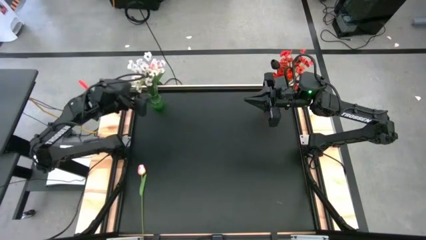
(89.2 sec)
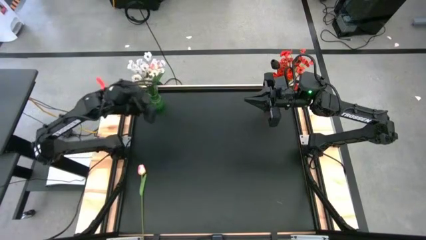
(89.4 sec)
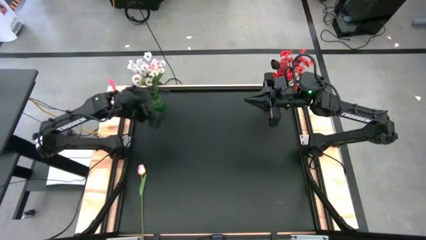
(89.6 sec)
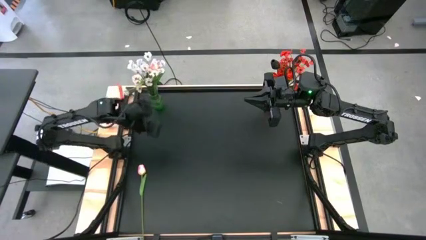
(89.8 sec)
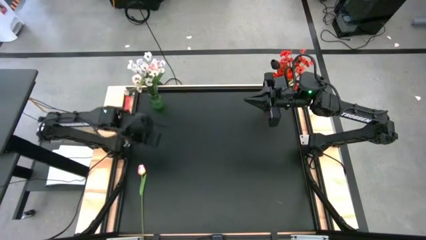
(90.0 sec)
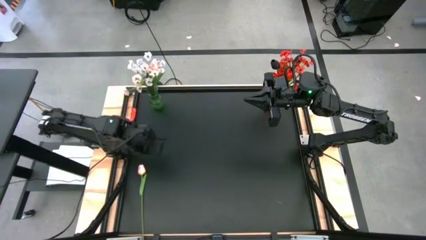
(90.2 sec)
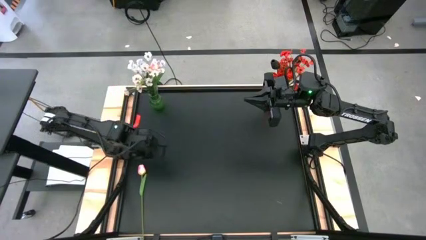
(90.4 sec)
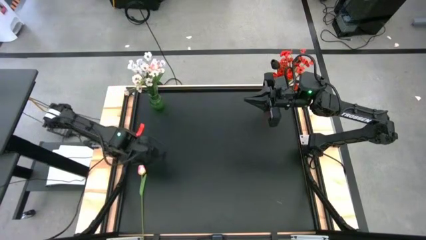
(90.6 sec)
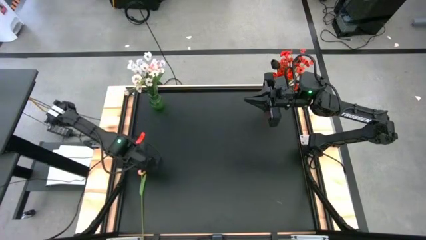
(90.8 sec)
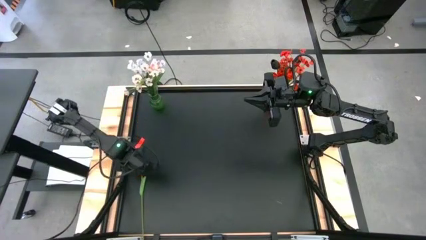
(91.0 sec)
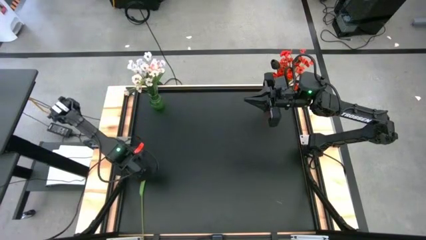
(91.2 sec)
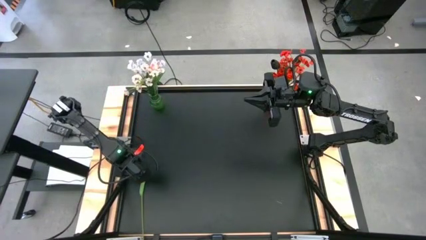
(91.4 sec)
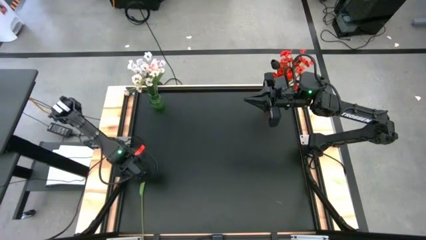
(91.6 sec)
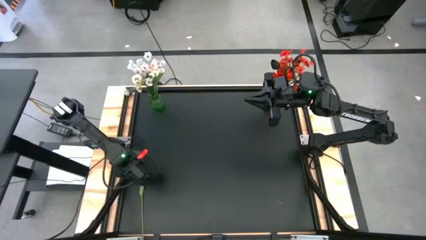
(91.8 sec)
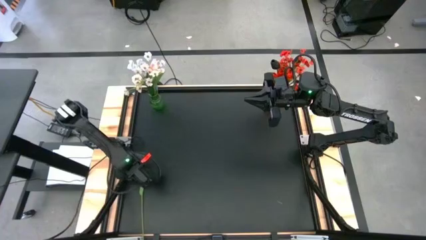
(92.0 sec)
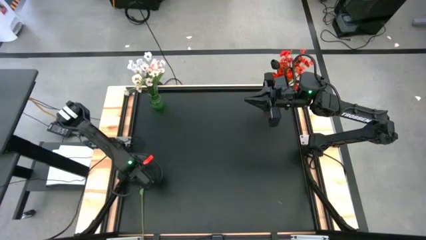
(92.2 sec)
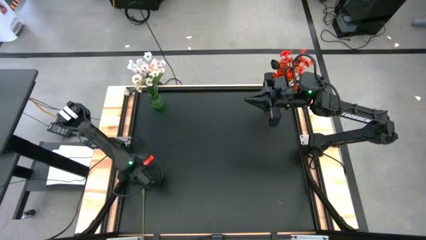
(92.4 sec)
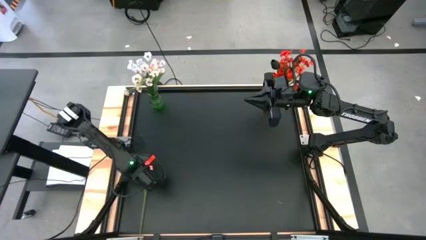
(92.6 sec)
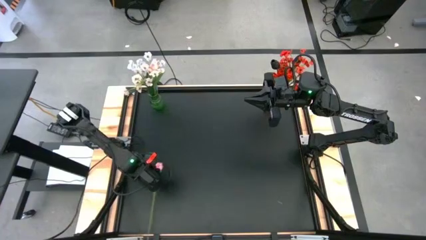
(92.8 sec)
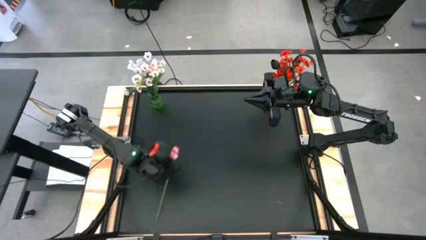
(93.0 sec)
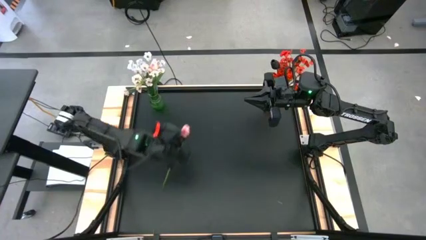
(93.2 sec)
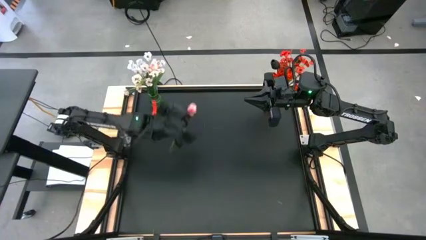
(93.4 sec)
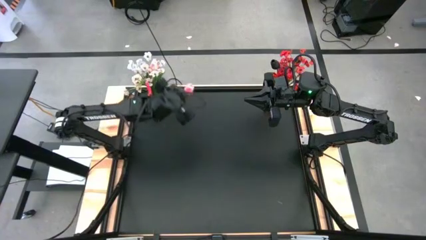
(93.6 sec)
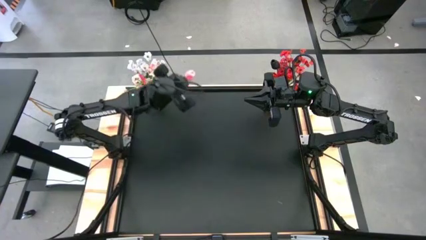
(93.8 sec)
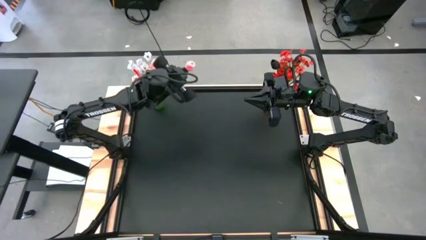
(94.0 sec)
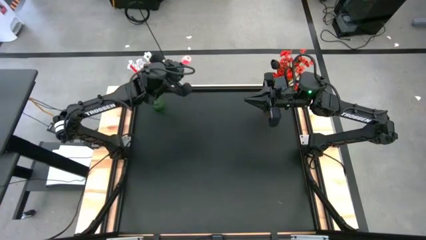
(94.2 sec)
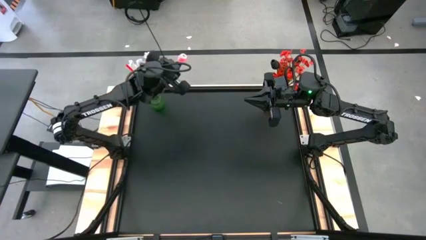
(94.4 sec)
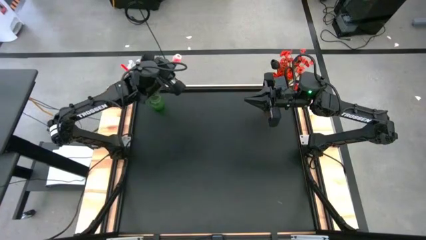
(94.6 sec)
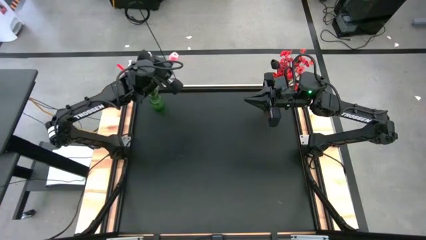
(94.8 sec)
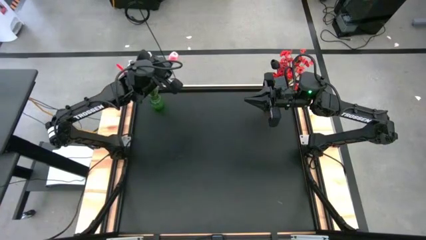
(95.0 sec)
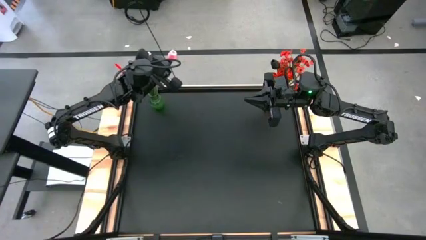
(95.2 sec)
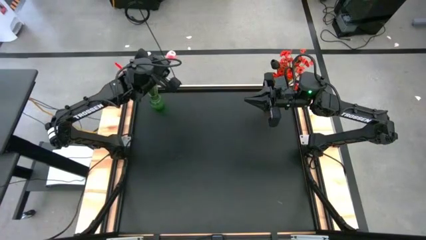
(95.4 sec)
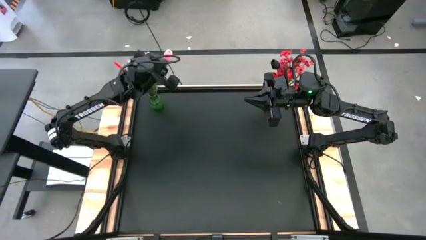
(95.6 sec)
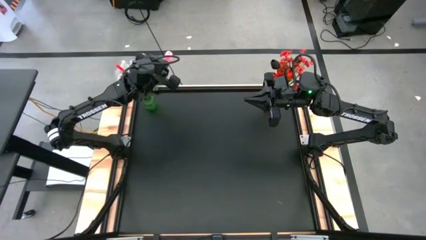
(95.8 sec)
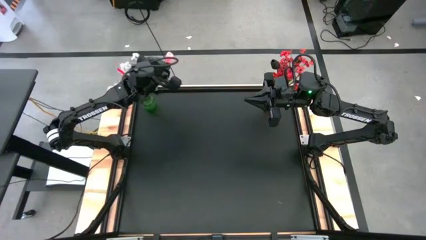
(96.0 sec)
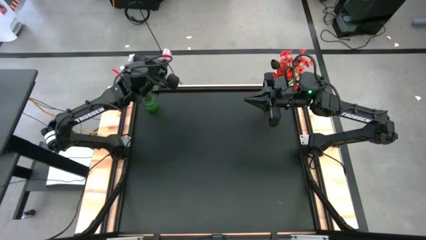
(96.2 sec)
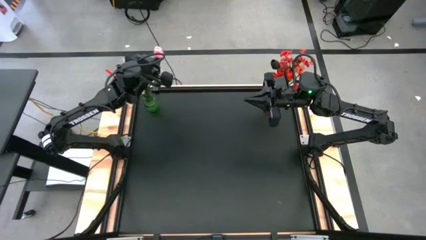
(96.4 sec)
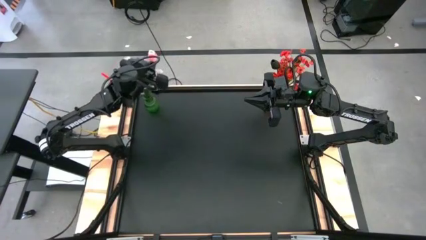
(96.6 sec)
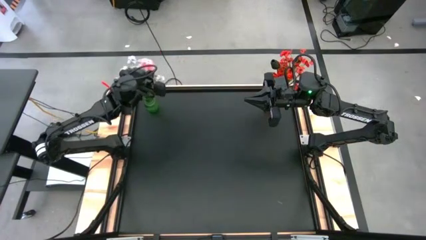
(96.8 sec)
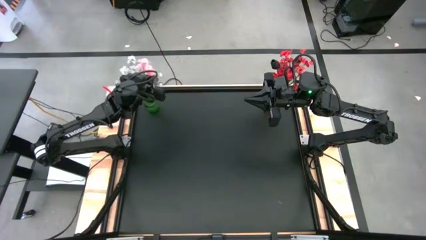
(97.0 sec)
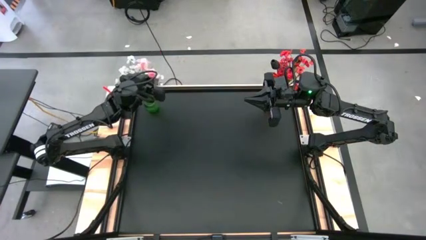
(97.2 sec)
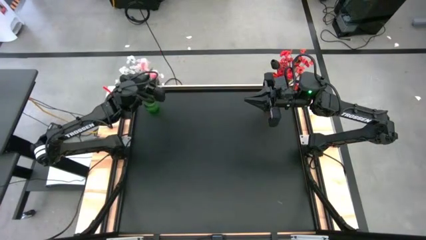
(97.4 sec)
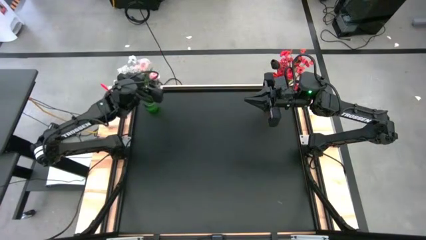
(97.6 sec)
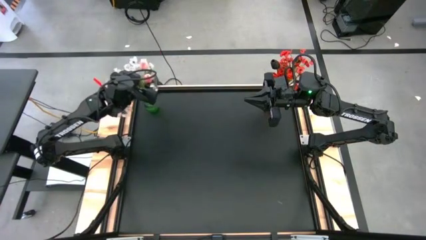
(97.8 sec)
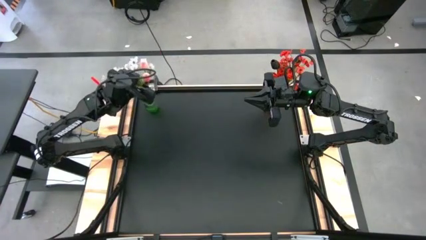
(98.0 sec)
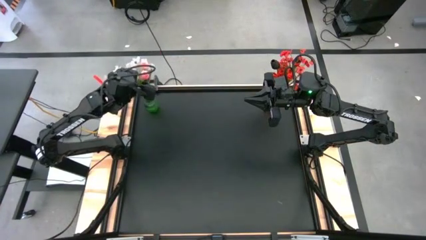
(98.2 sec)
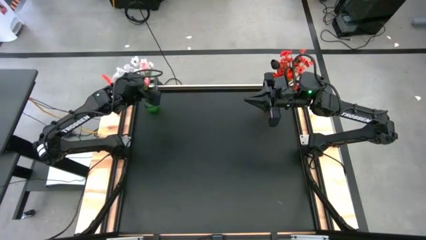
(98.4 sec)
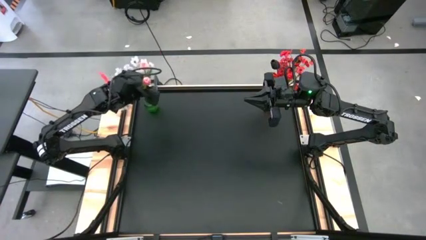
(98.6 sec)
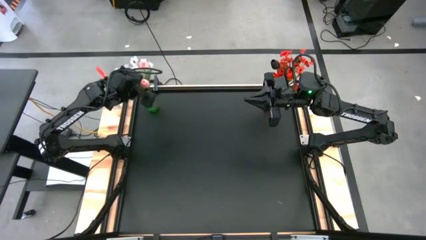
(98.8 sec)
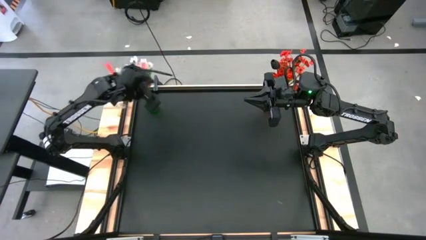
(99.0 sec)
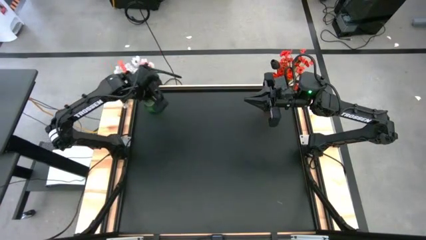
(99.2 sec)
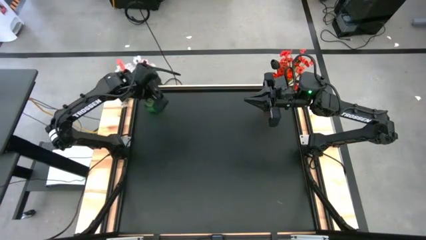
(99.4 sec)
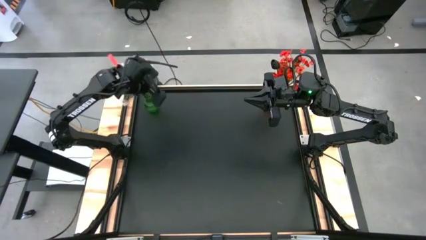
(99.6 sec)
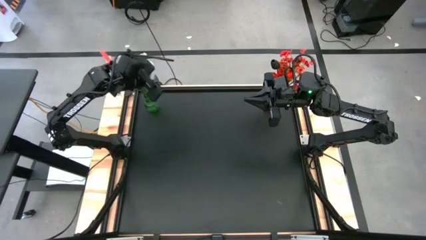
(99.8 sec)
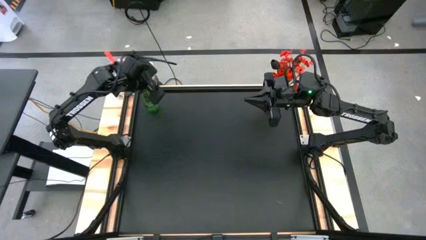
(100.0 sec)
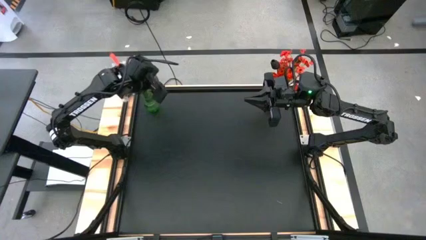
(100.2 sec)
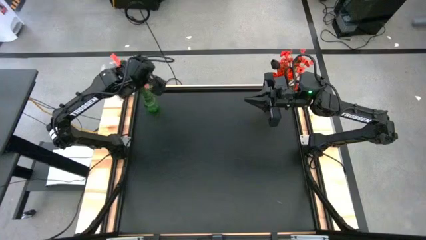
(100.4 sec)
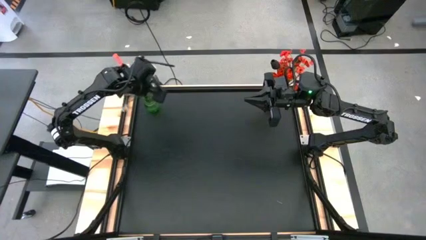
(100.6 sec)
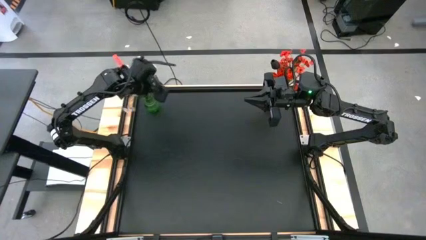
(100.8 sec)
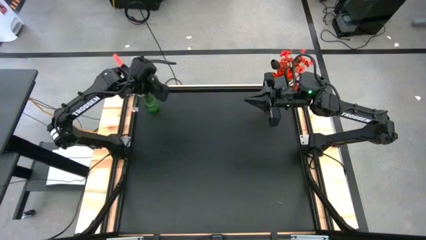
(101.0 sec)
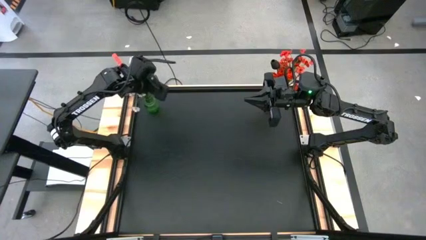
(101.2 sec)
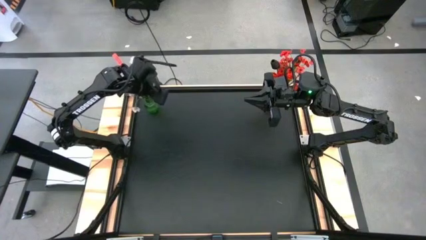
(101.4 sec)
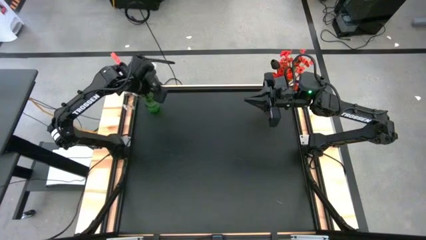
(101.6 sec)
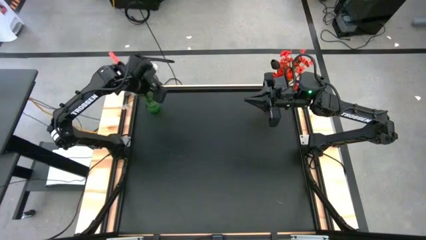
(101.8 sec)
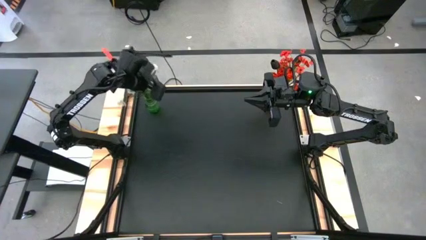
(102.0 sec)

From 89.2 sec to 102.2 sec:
Task: Sort flowers into vase by color
Put the pink tulip into the green flower vase
